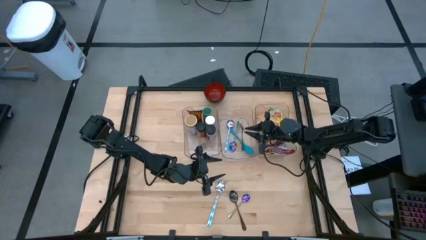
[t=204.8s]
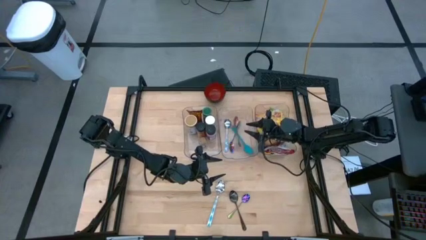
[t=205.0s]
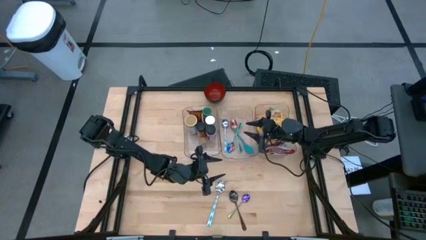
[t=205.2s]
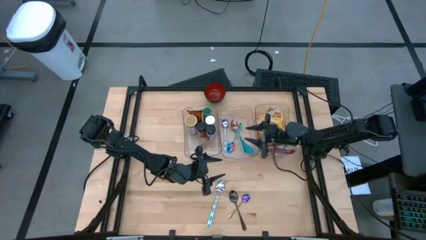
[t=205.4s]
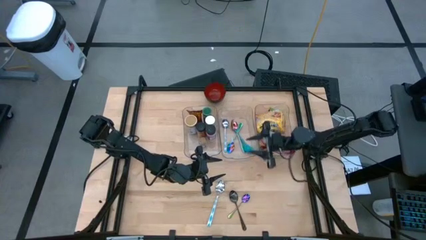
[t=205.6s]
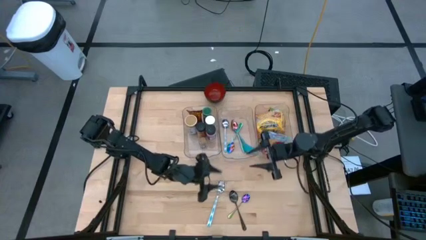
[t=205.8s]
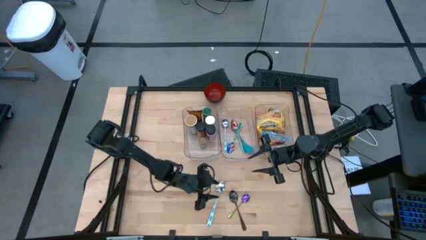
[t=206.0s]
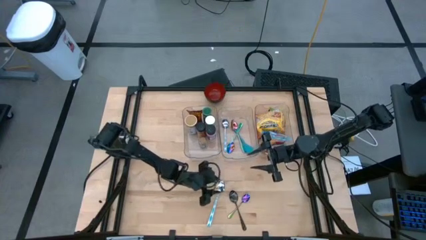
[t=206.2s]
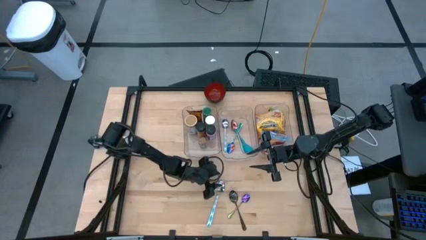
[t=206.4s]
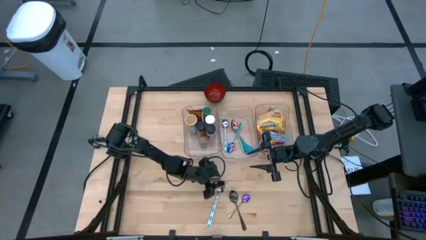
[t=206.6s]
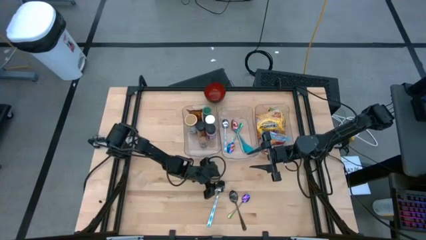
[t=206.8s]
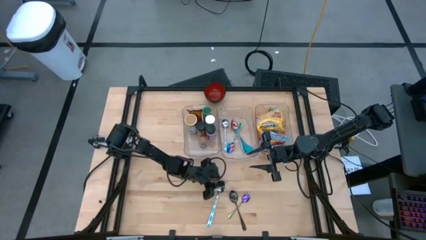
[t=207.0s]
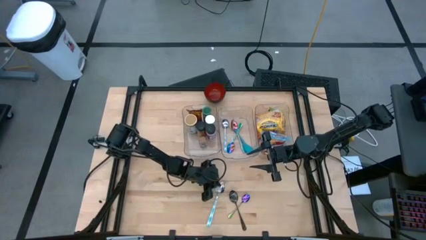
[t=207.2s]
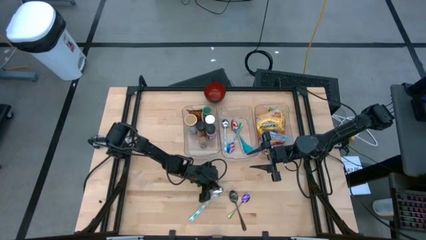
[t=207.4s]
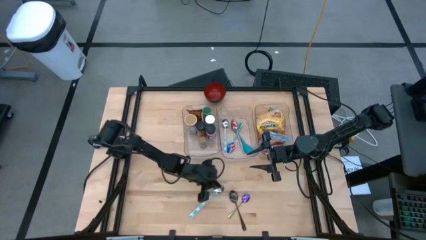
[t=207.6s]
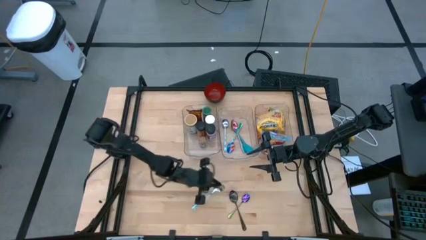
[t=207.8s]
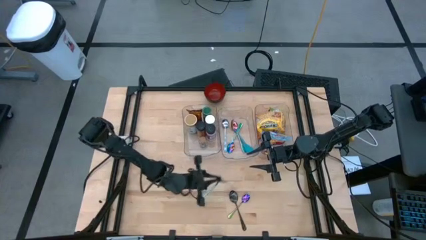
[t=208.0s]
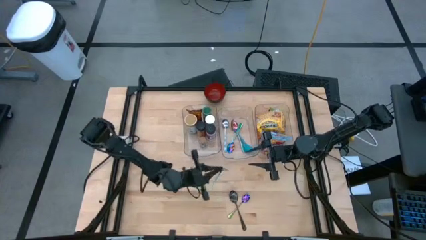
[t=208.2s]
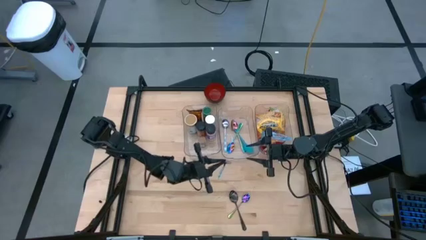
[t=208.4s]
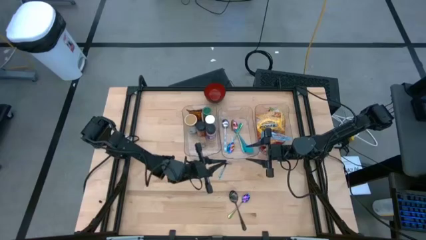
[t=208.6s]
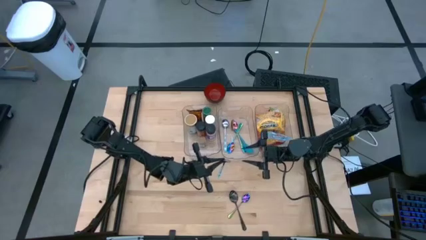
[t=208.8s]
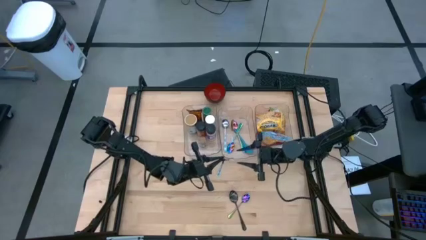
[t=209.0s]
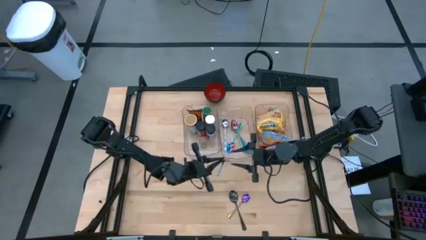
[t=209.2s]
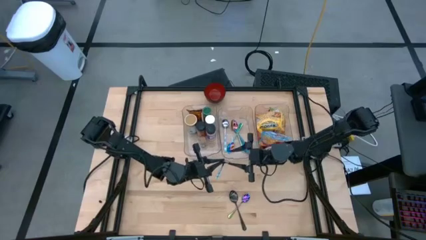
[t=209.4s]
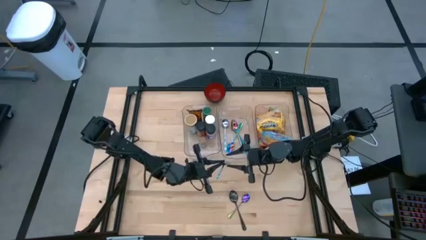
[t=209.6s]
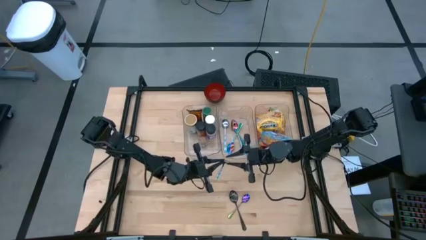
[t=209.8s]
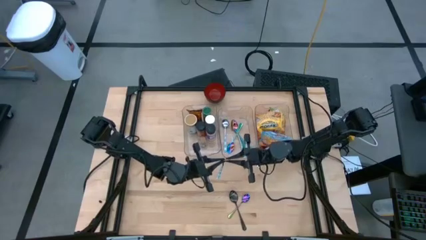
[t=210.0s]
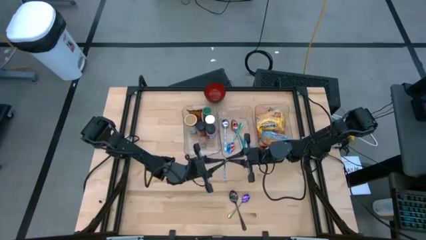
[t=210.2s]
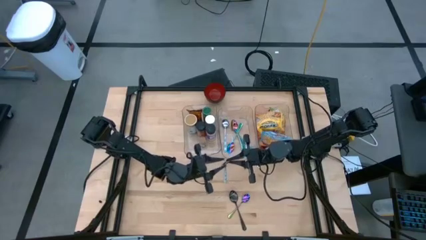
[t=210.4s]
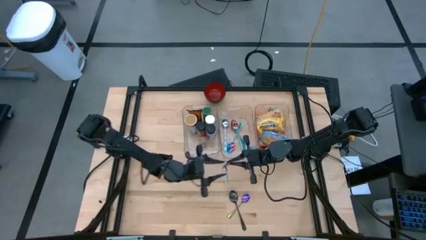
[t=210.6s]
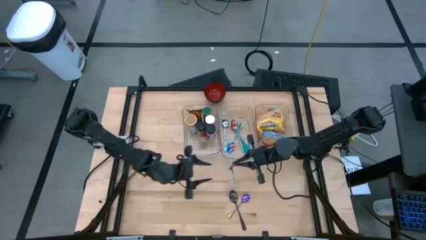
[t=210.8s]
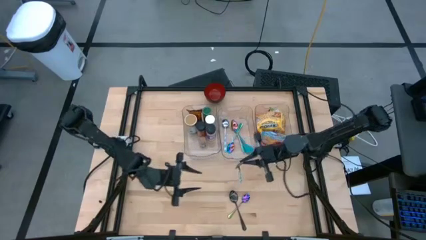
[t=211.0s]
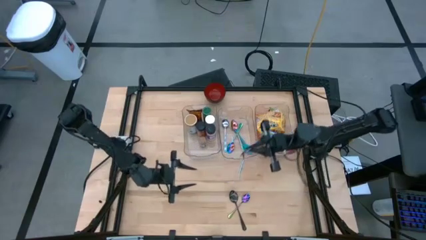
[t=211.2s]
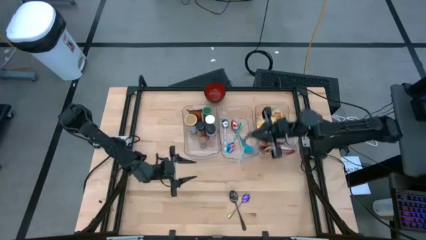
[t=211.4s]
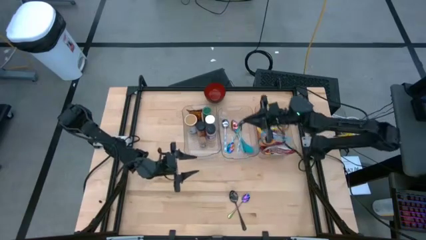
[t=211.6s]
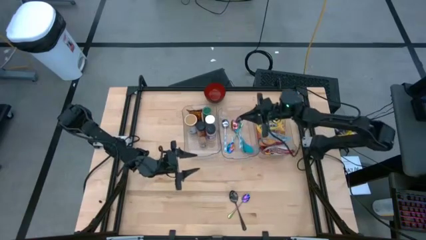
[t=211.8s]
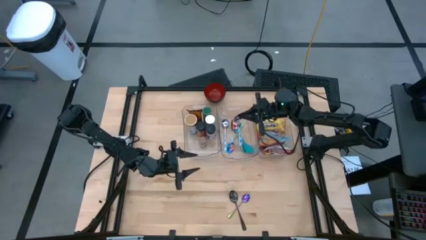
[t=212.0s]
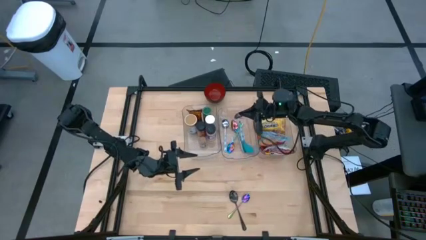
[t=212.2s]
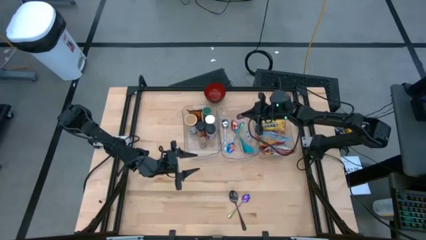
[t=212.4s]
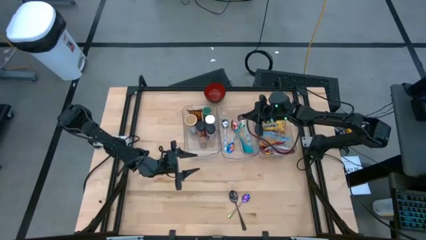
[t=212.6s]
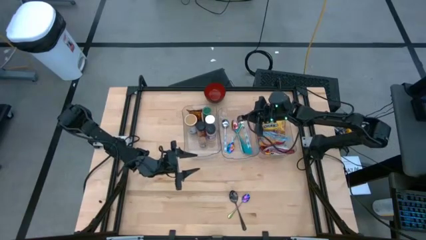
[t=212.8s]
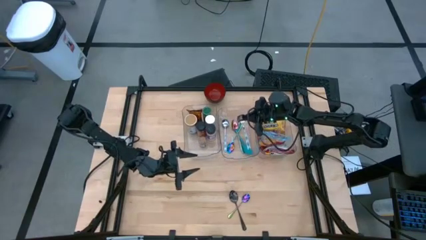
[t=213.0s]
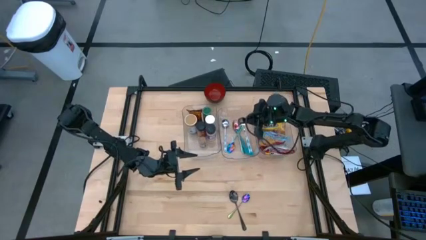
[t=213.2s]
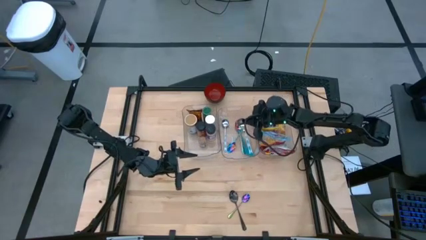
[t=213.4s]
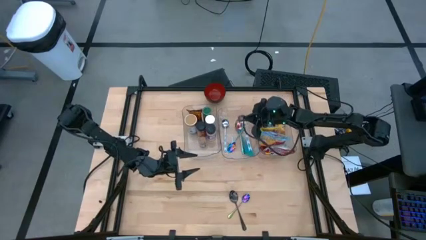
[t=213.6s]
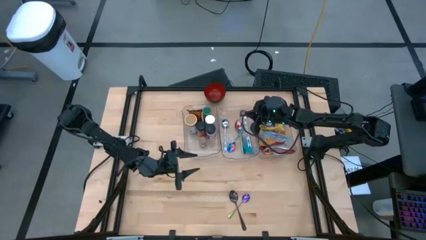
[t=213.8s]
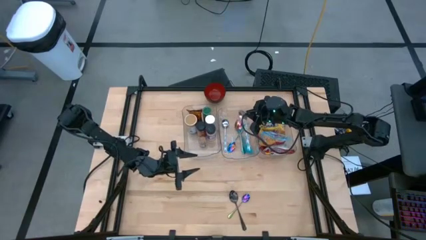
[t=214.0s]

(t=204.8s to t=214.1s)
Task: Pick & Place Food Item
Put the blue pattern spoon into the middle transparent bin

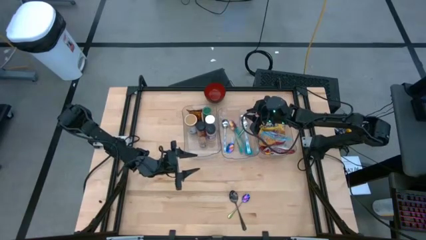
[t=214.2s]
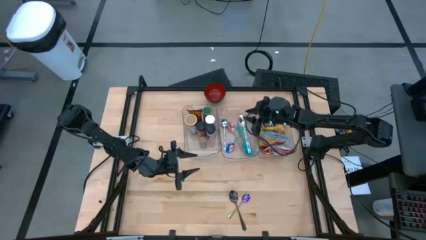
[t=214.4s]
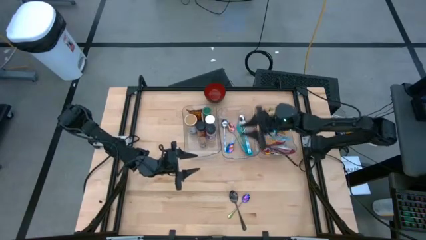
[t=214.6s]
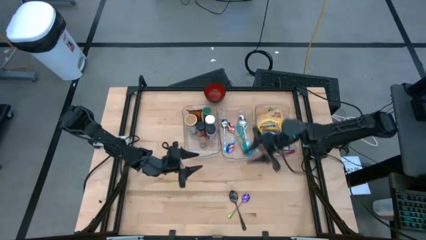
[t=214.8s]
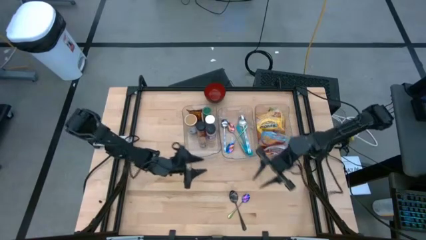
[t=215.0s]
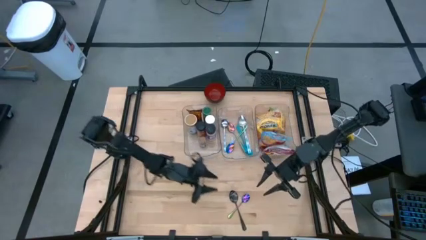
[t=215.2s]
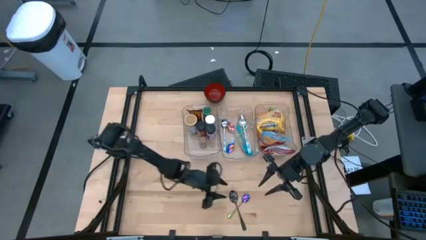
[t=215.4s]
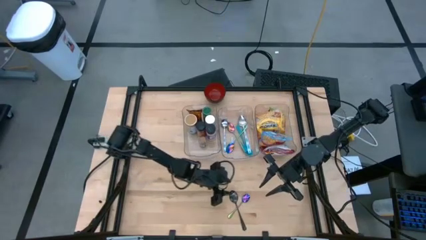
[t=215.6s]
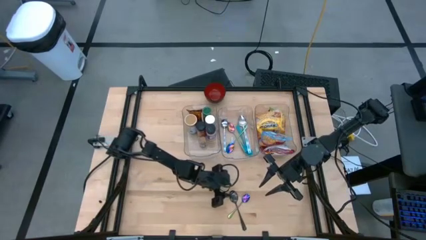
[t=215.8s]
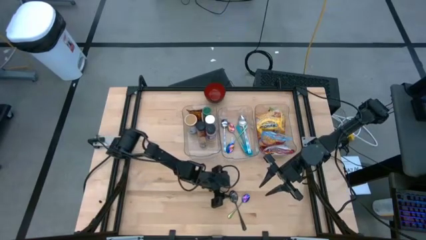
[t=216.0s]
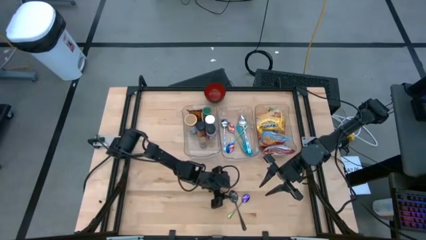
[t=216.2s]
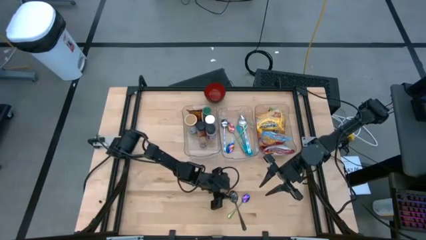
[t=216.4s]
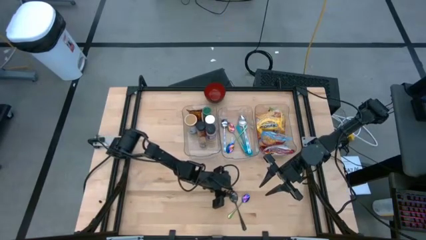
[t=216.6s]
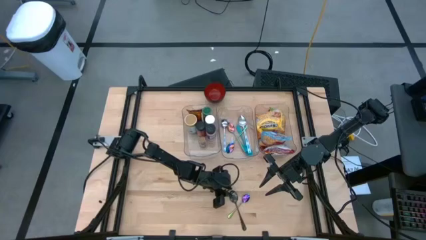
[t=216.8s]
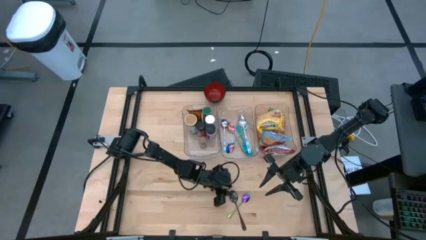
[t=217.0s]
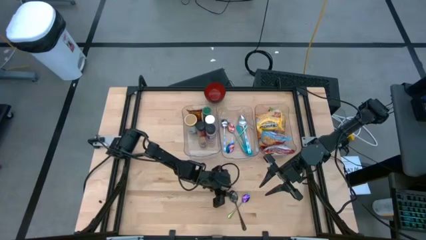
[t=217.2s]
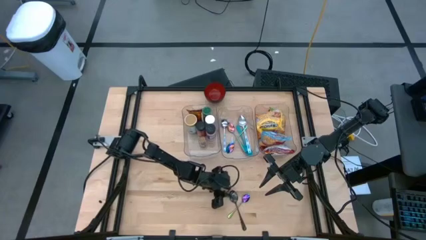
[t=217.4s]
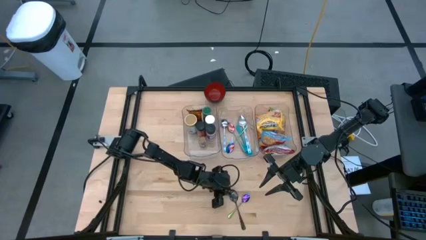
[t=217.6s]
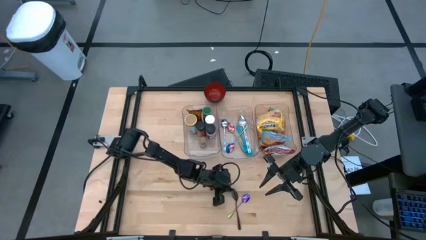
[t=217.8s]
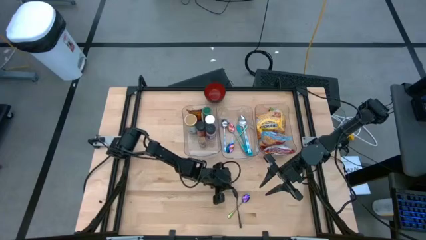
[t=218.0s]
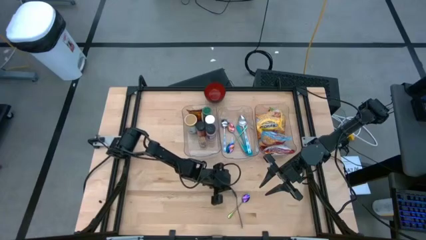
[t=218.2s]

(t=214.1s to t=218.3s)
Put the black spoon into the middle transparent bin
